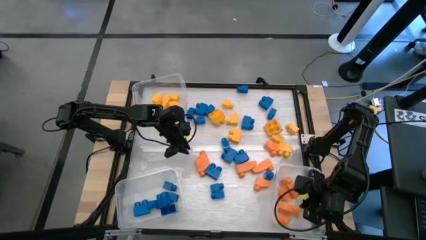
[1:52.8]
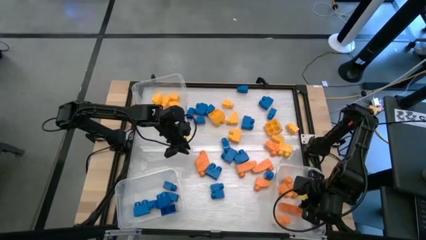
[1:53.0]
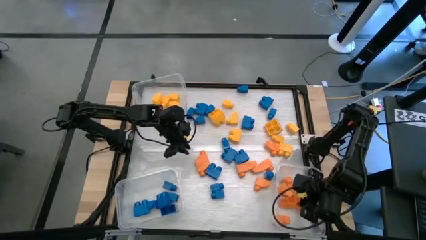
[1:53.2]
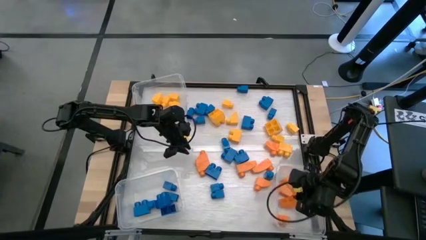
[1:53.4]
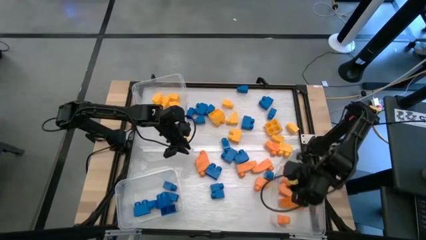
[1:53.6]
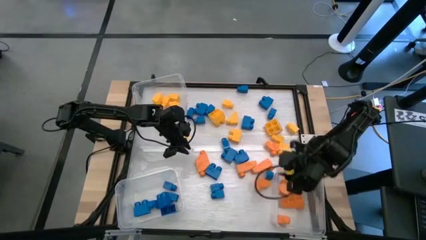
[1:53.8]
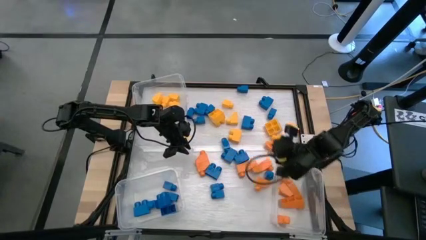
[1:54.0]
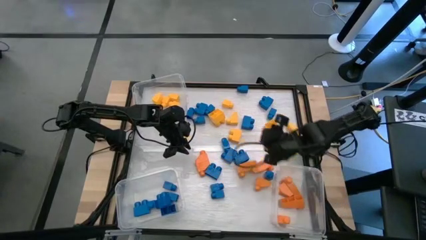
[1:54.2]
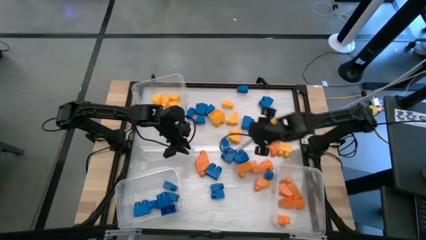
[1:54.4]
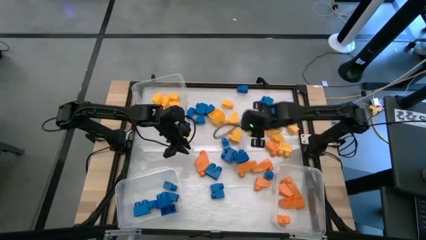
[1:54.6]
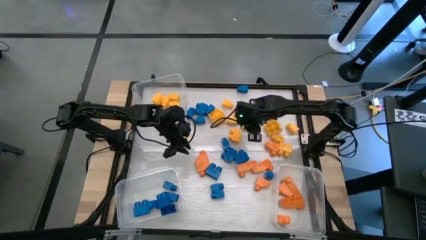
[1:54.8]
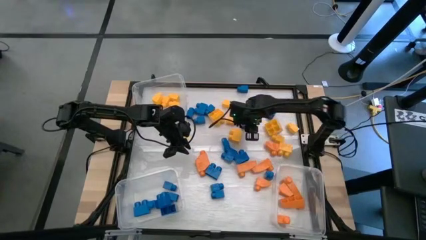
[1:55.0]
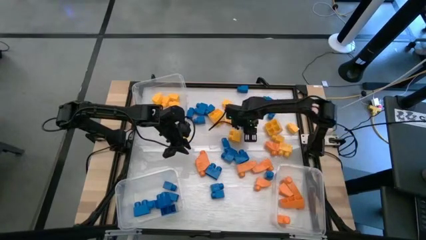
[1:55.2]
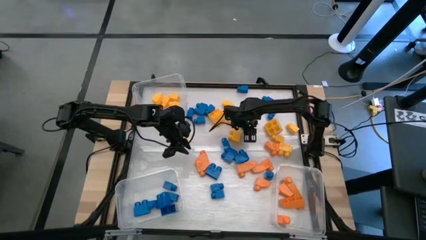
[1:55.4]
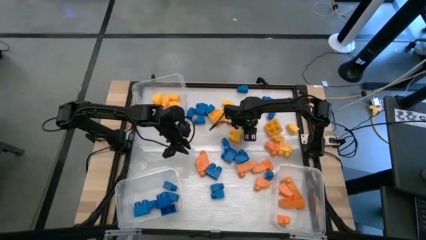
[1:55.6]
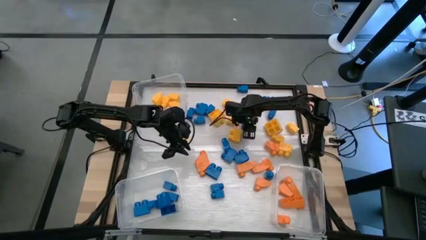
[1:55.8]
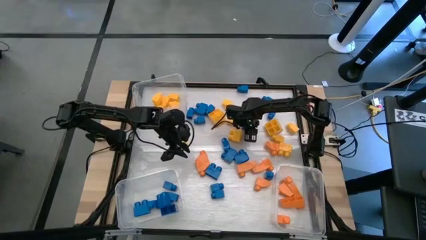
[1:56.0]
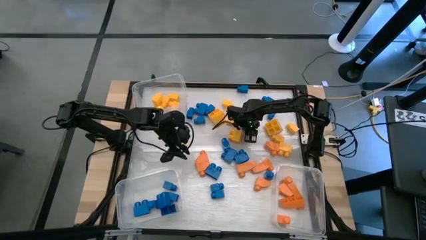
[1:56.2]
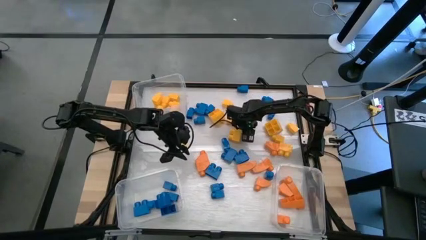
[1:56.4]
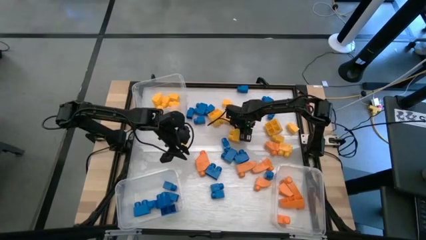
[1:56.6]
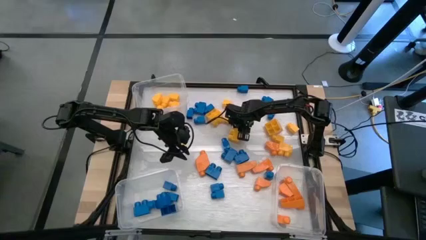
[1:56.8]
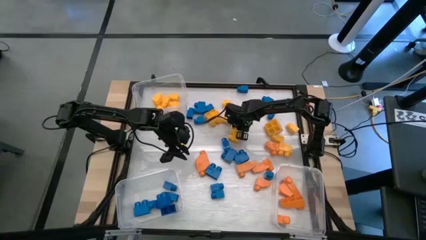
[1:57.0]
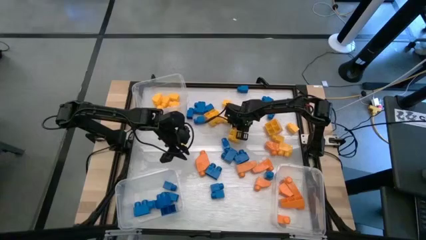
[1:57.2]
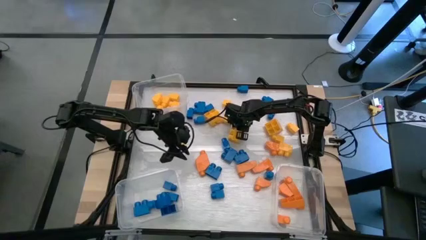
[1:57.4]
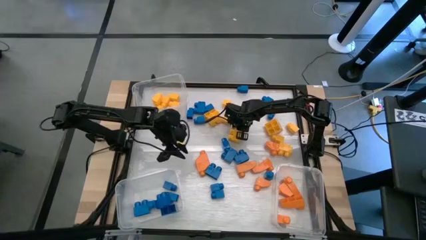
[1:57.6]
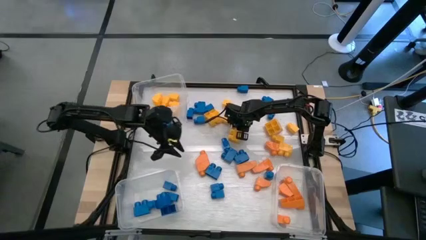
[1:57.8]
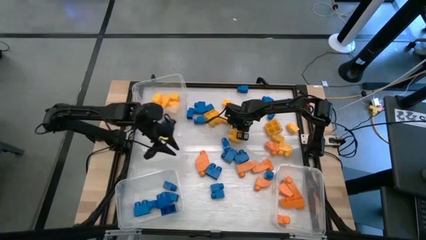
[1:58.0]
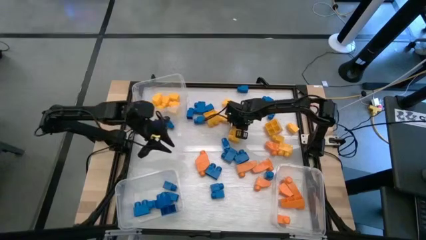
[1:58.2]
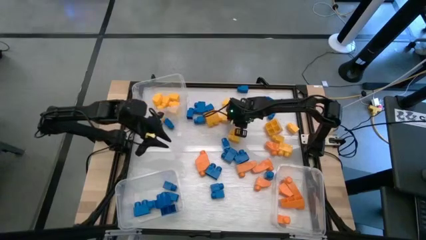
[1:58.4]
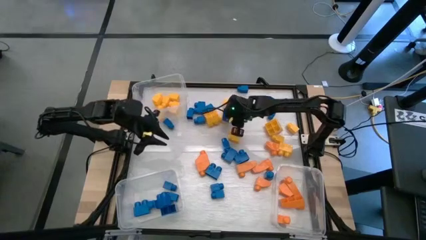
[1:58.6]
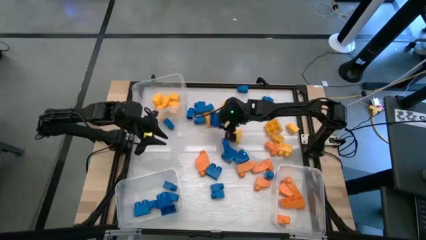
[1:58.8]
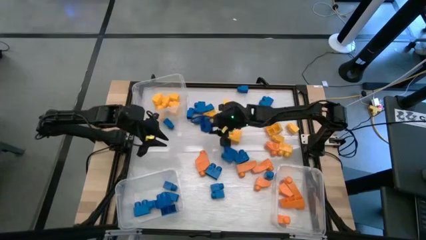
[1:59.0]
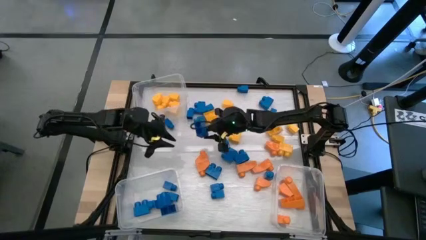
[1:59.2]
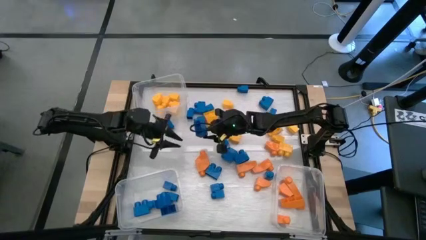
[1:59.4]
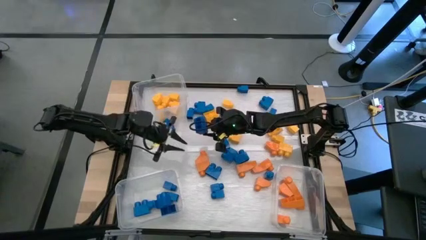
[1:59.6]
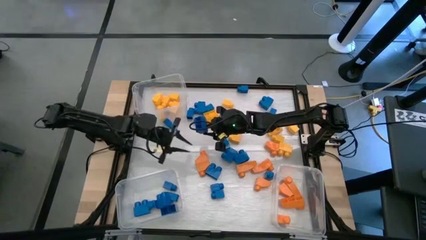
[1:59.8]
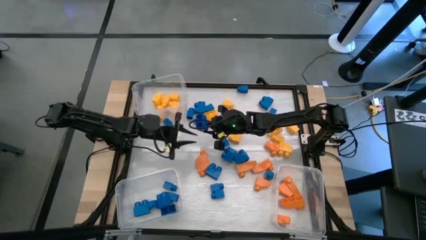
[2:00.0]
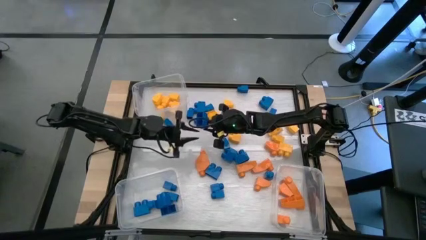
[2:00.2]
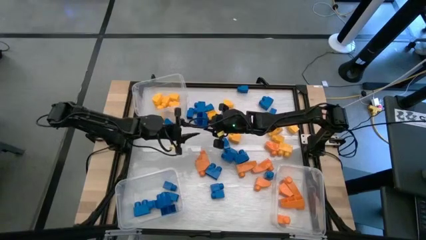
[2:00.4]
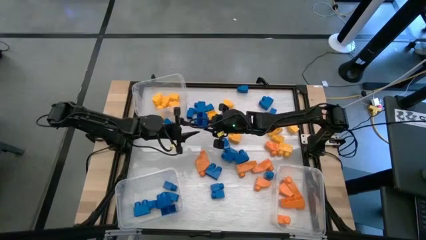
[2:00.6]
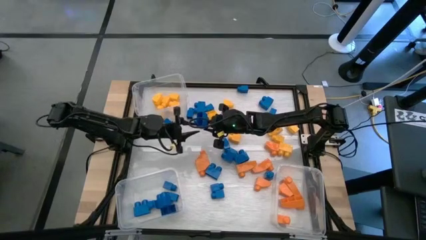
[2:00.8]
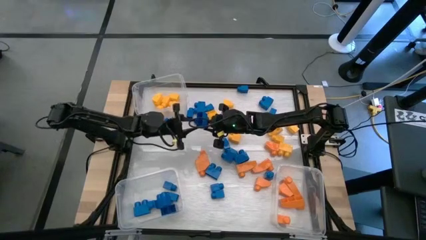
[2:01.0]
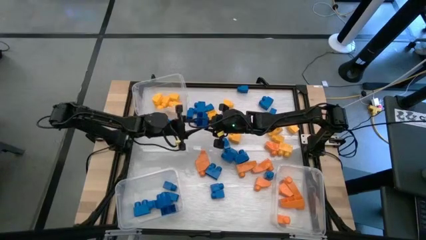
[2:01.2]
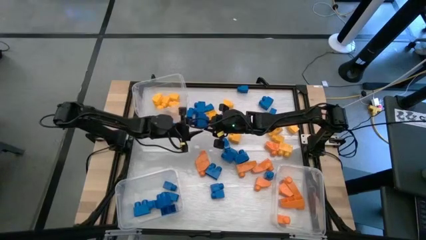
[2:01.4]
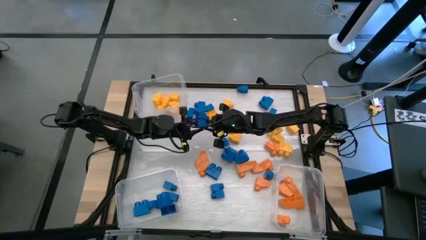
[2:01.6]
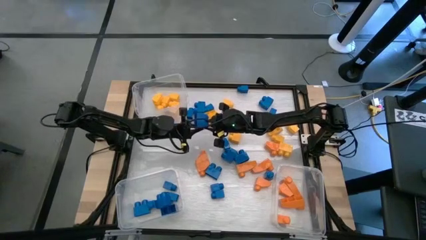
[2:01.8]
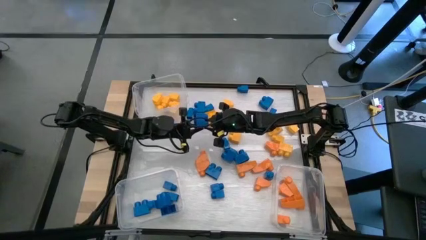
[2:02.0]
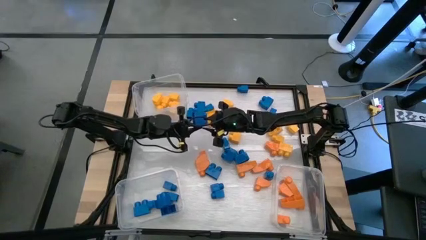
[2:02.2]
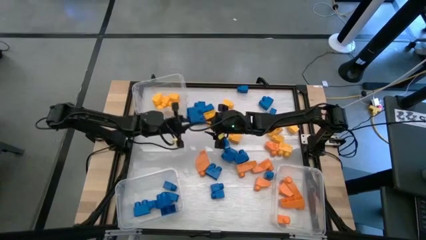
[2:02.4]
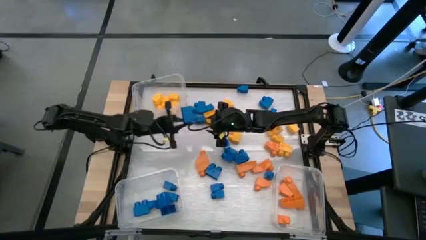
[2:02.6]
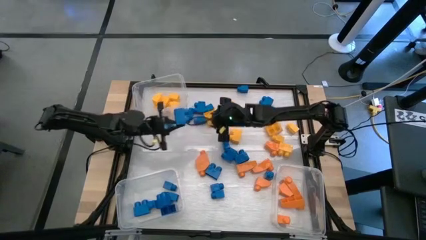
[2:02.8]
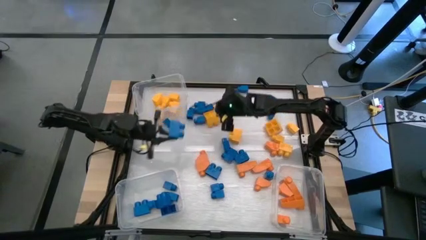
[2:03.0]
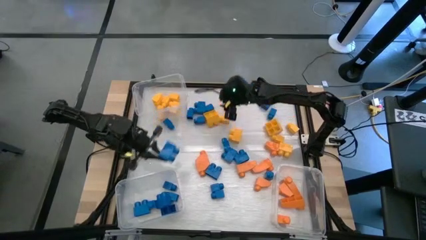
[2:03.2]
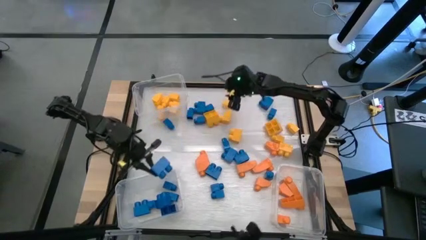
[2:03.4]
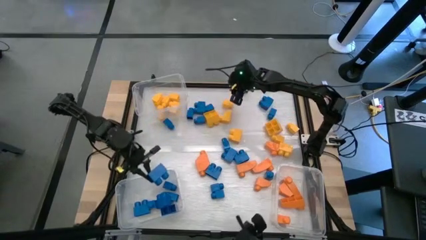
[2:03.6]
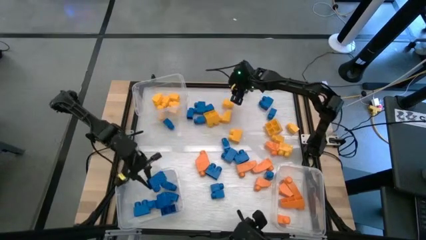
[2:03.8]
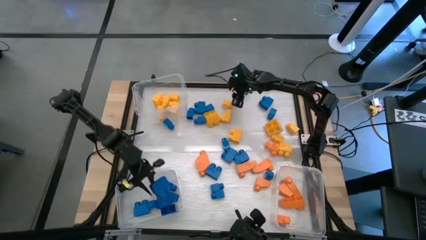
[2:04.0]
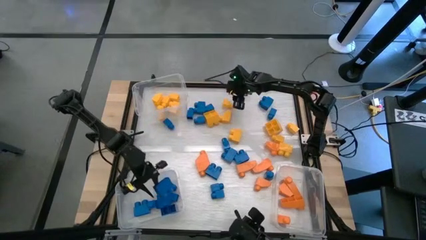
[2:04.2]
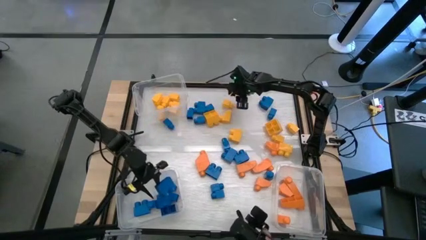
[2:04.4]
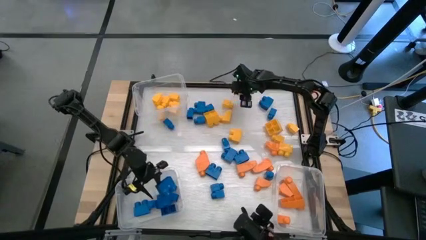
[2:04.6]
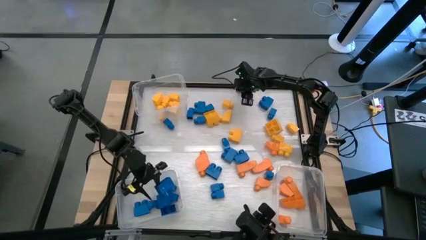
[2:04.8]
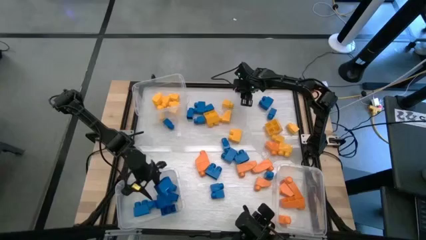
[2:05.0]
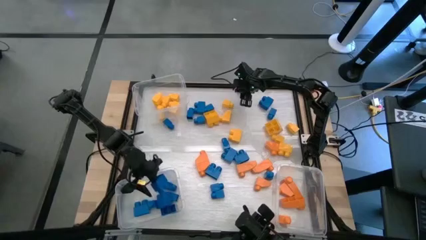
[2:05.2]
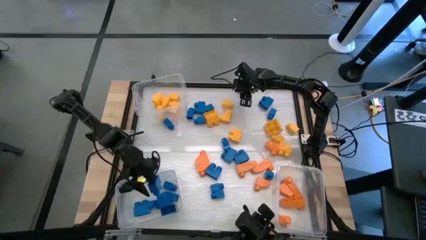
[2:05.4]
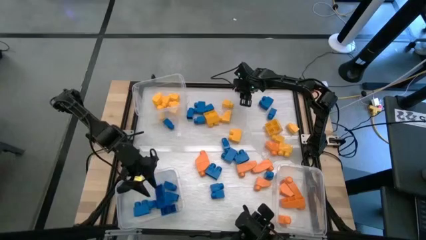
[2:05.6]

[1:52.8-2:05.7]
Task: Sort blocks
Put the blue game piece into the bottom left transparent bin

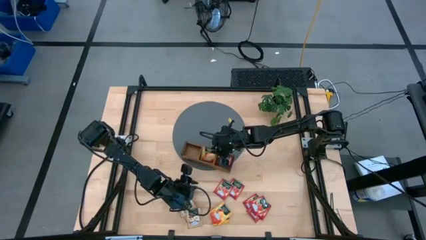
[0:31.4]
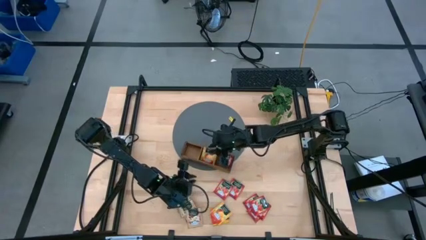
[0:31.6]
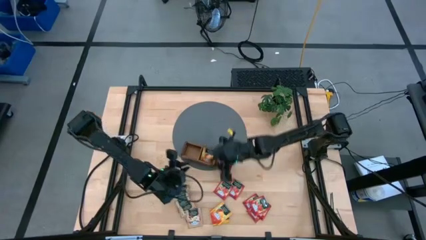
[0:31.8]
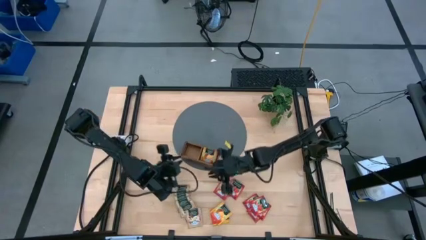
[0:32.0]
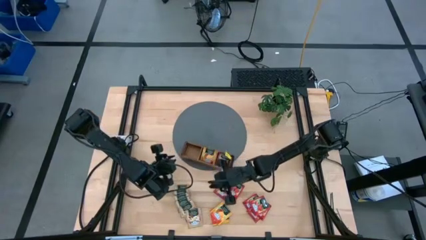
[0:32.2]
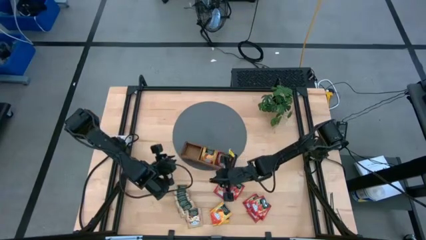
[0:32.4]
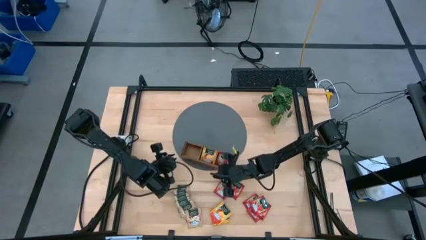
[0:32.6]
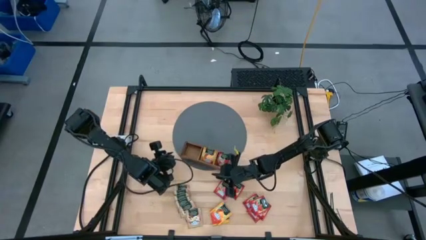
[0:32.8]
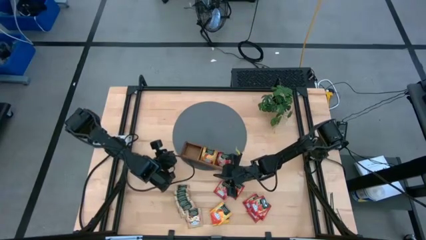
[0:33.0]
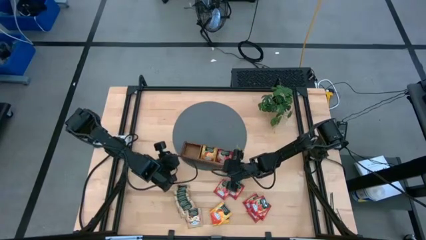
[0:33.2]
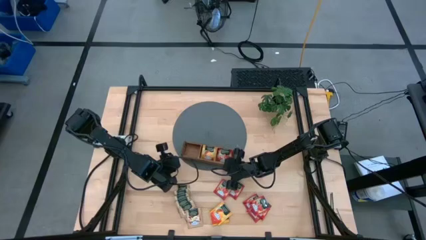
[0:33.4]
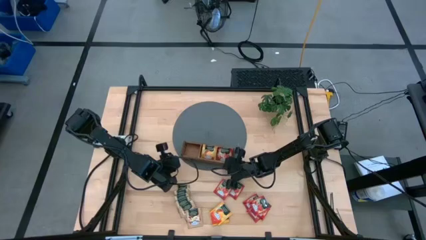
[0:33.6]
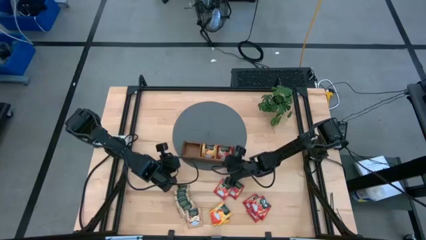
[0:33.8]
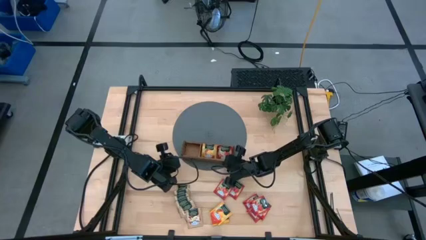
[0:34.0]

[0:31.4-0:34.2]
Task: Pick & Place Tea
Adjust the wooden organizer
